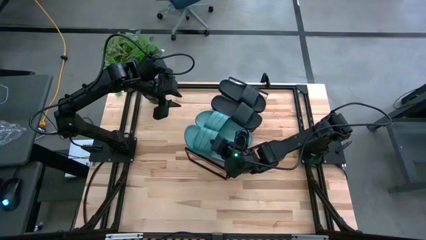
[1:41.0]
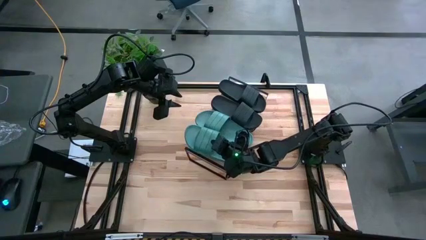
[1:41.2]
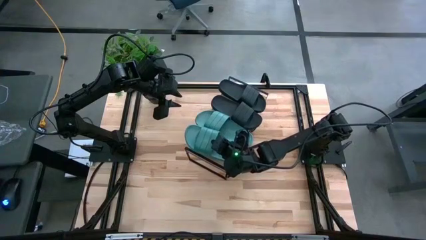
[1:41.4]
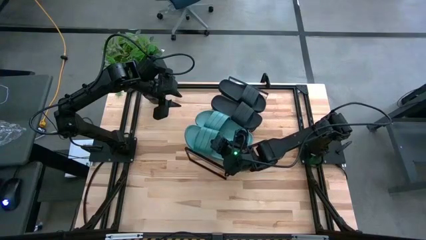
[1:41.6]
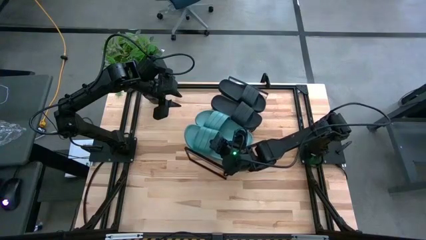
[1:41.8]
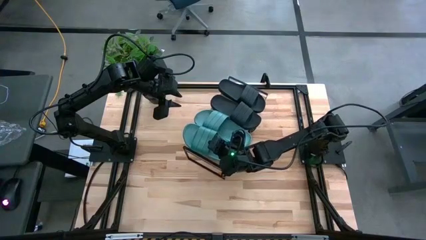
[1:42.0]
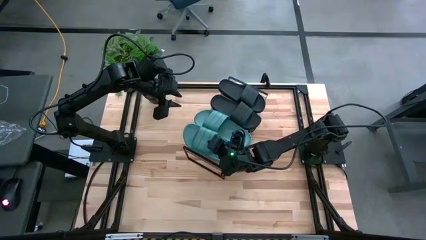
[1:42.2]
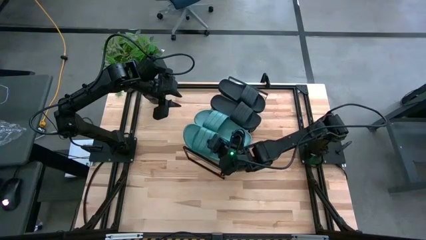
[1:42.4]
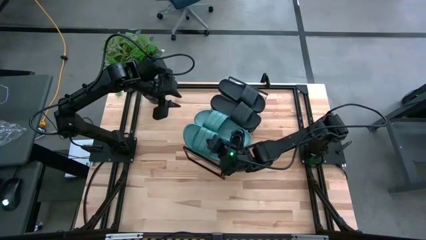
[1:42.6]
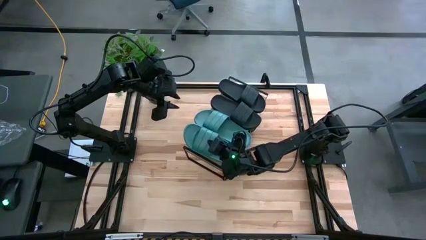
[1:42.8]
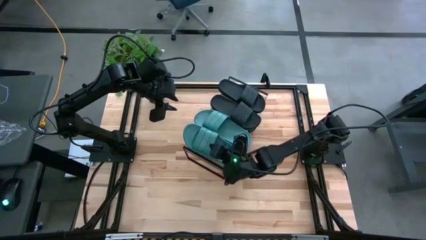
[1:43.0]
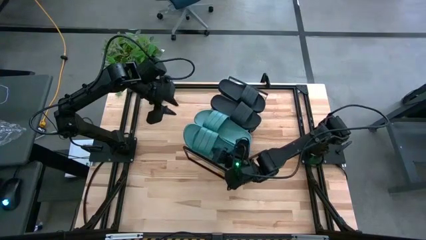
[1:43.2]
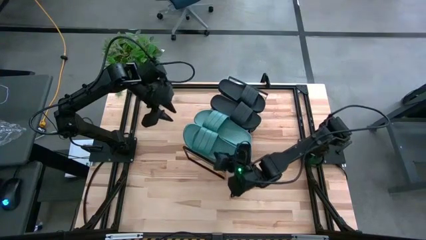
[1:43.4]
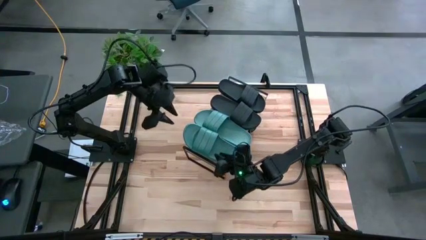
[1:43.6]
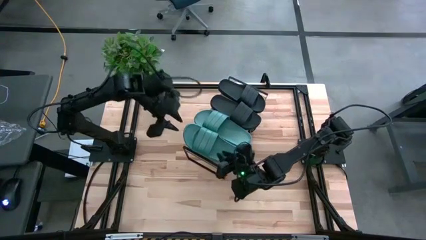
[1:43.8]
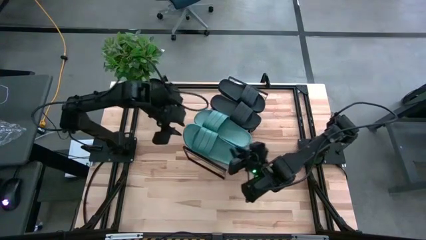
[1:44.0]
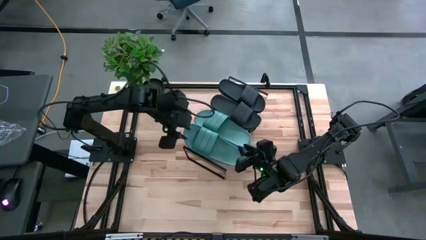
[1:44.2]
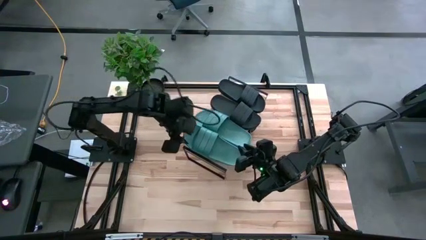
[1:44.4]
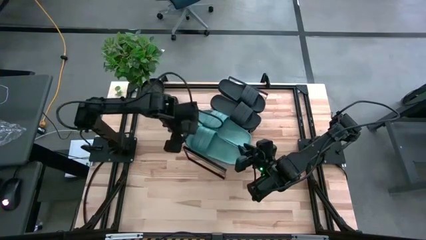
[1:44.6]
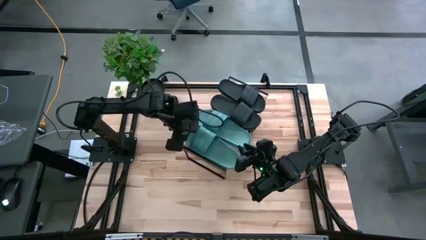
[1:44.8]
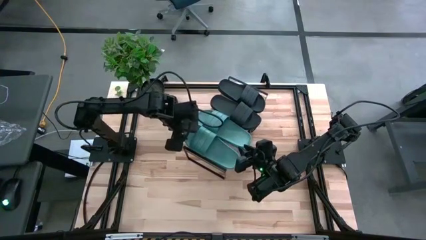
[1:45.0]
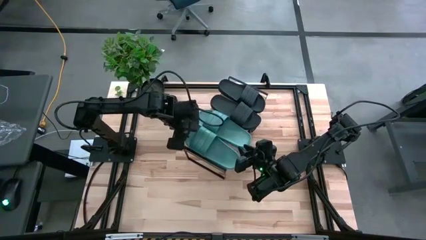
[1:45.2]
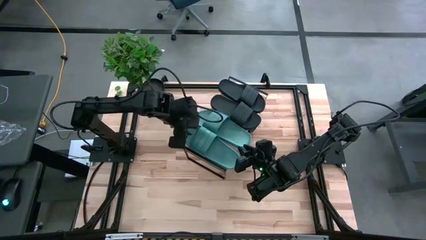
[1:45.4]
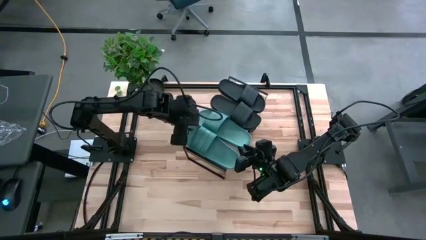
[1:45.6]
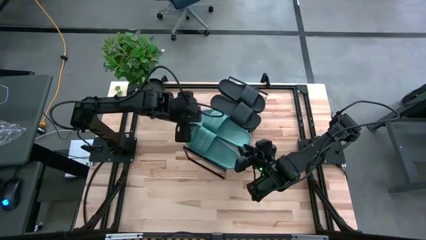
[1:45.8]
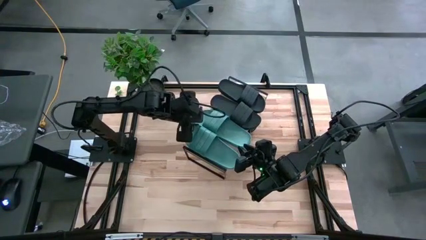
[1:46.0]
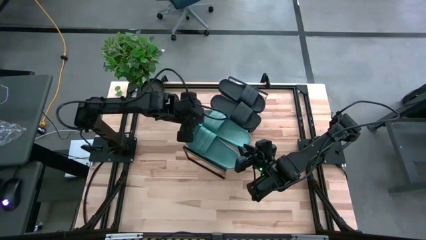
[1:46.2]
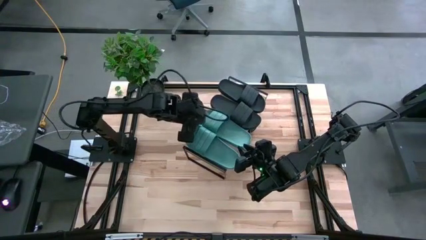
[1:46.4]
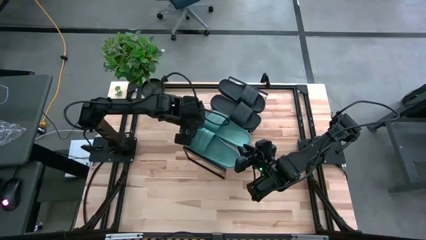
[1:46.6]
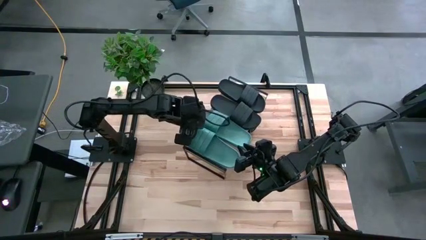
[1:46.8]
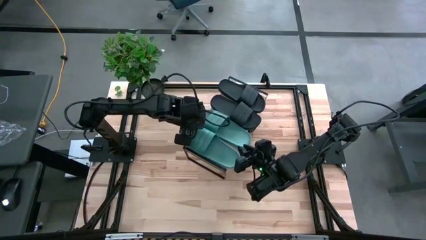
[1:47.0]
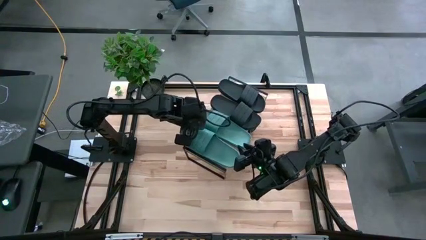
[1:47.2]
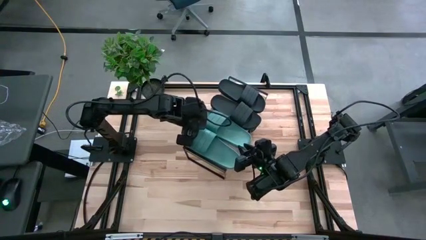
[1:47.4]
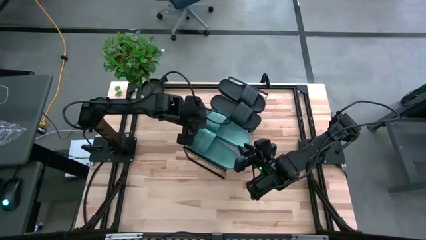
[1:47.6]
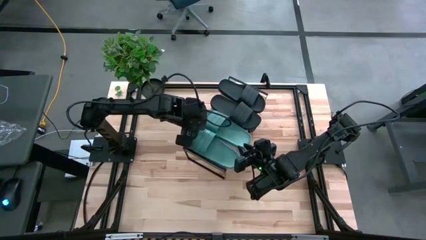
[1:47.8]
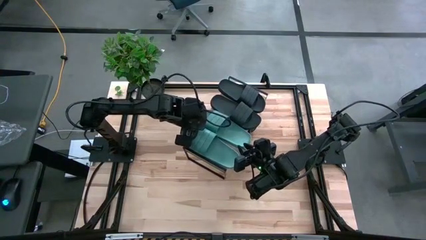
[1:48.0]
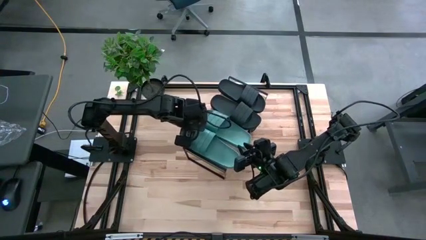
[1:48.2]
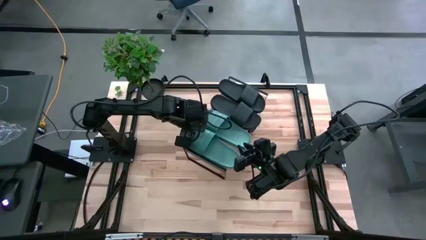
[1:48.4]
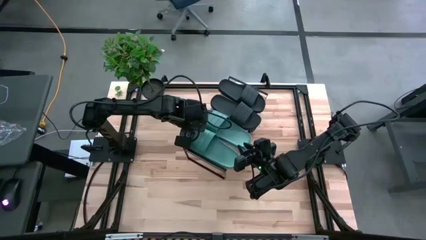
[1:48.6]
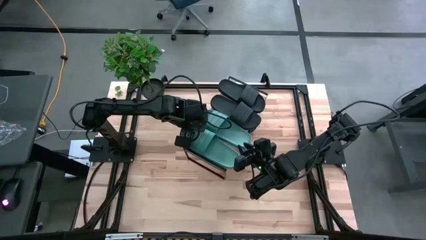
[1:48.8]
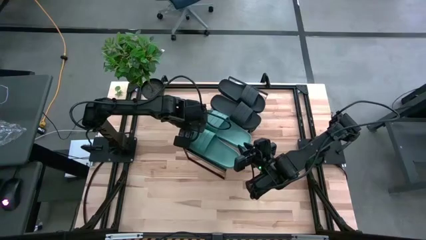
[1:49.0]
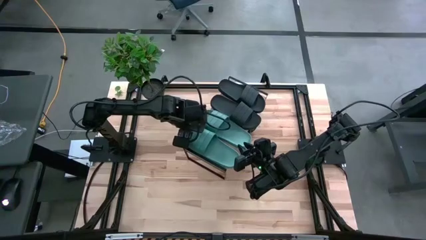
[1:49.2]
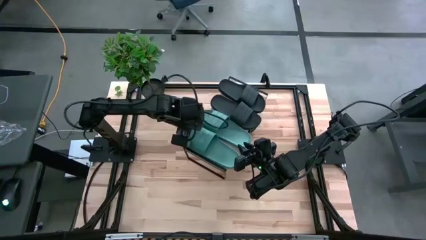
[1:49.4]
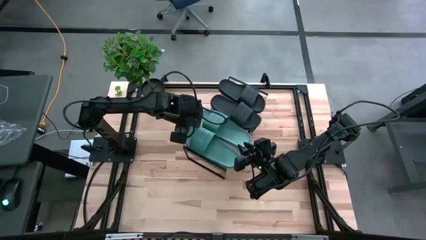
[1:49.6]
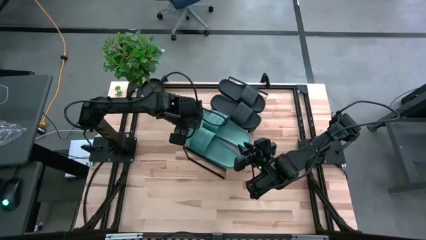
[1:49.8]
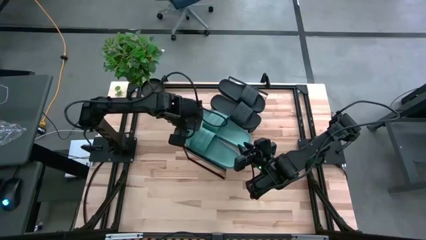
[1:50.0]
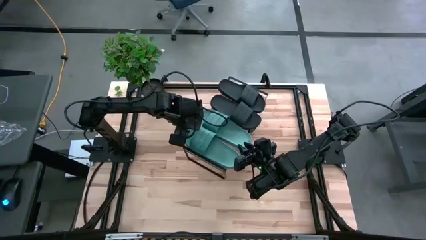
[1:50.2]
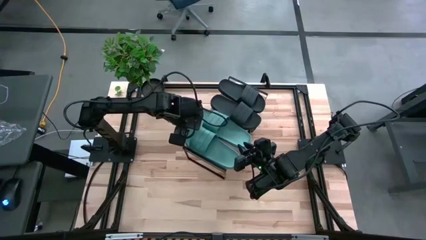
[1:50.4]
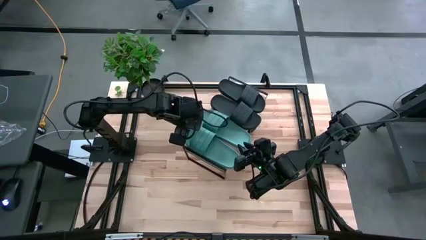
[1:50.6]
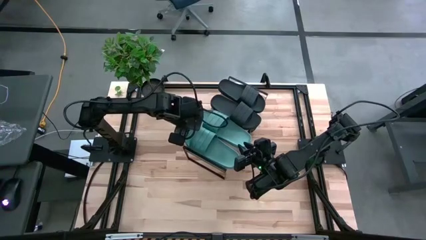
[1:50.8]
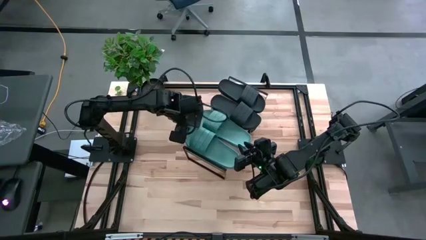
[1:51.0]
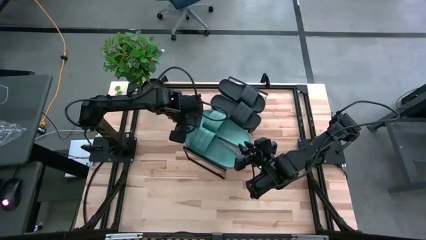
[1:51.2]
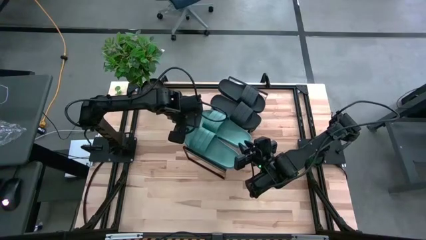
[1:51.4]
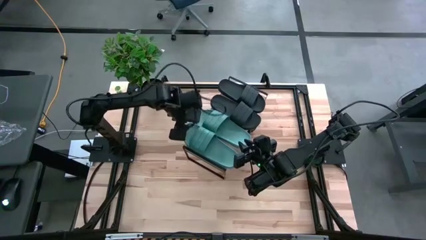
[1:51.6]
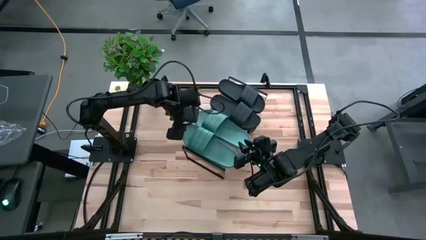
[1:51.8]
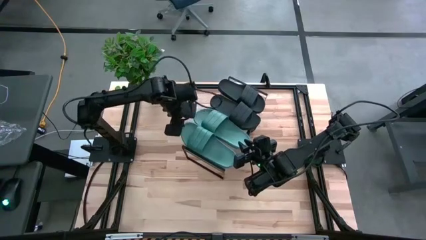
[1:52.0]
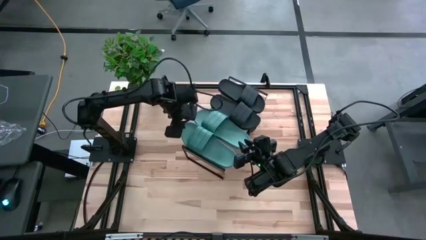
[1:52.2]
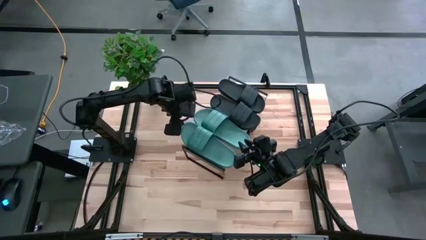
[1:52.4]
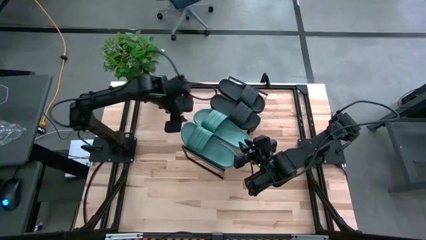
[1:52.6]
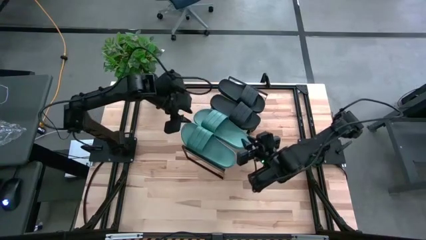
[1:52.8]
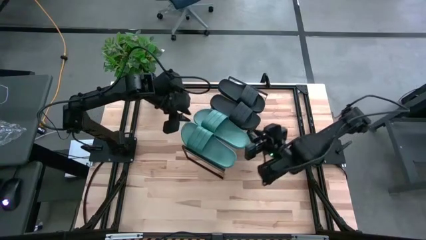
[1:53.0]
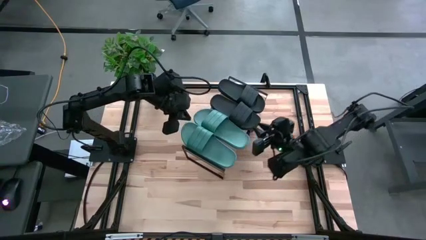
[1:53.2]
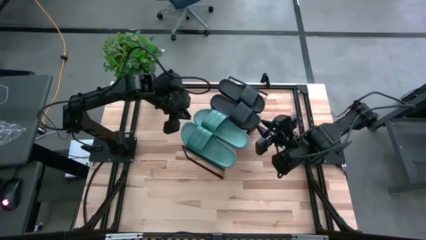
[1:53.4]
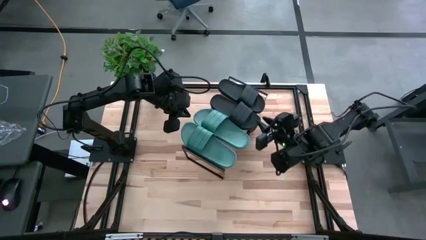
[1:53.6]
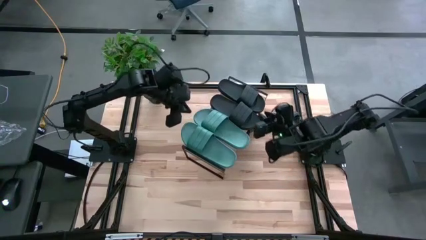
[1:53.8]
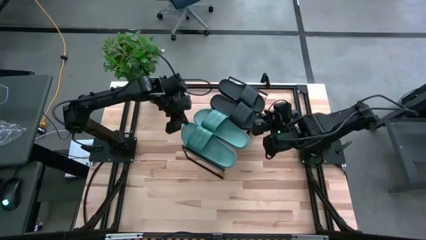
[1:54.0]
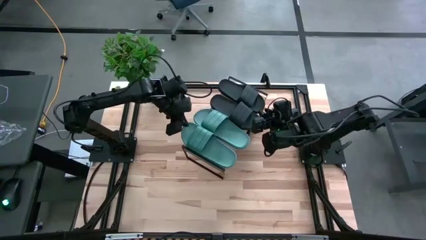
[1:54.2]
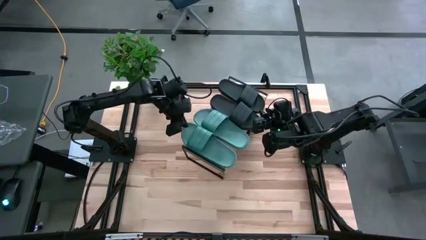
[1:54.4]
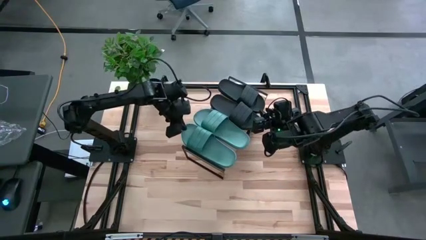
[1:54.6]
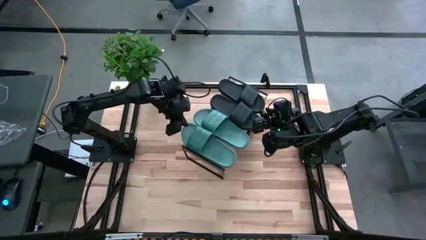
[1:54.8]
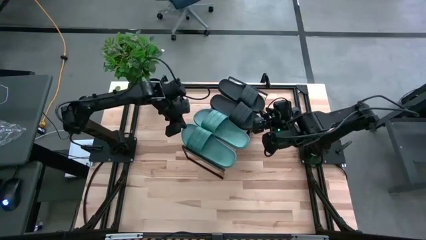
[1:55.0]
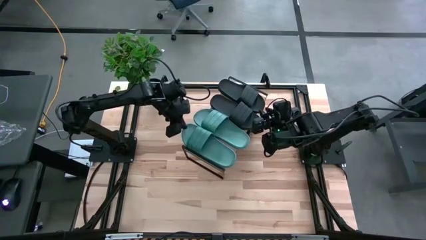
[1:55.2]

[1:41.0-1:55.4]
Task: Pick and place slides into the shelf
Put the green slipper on the shelf

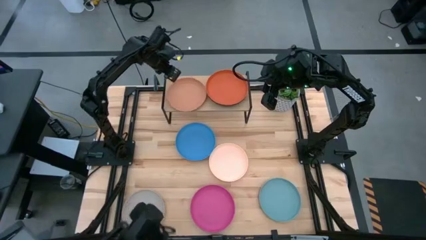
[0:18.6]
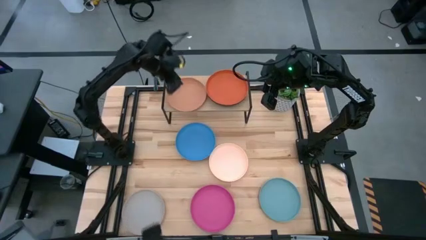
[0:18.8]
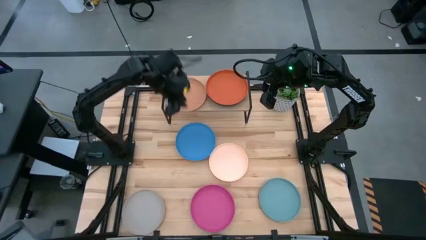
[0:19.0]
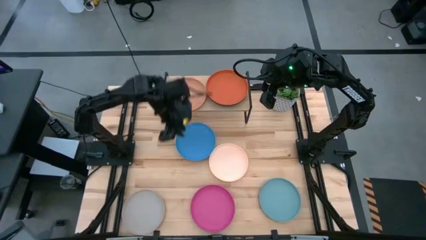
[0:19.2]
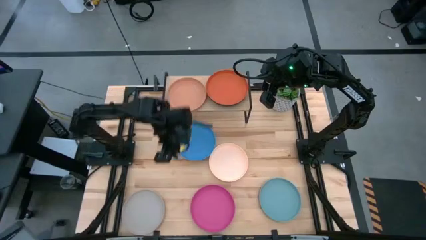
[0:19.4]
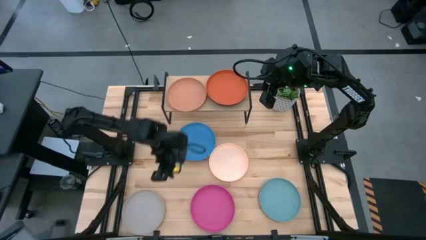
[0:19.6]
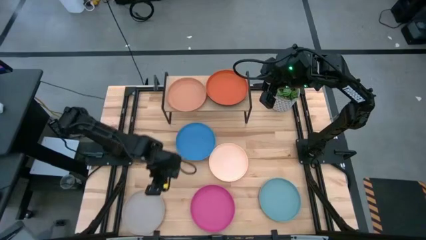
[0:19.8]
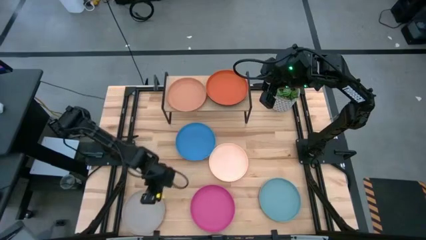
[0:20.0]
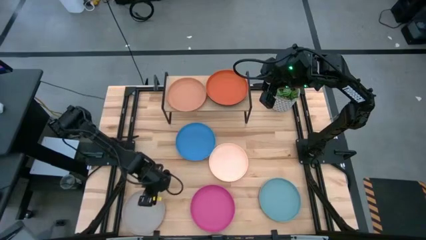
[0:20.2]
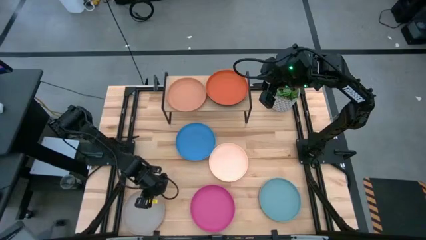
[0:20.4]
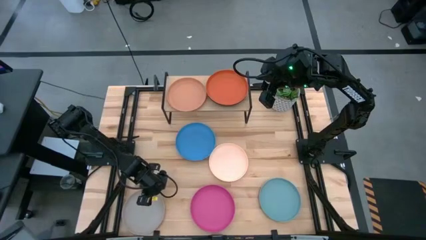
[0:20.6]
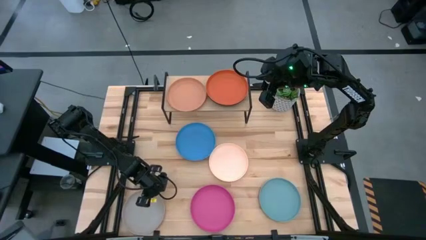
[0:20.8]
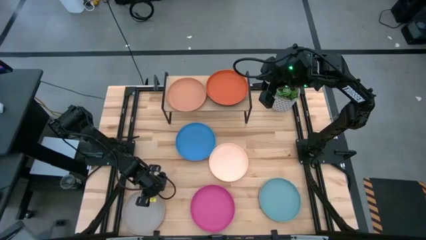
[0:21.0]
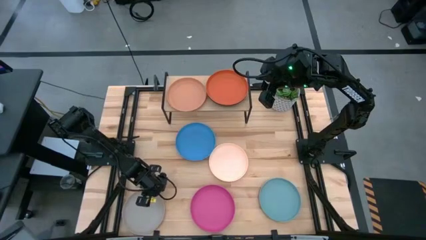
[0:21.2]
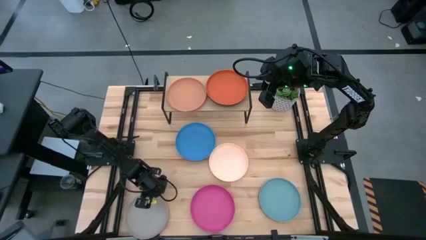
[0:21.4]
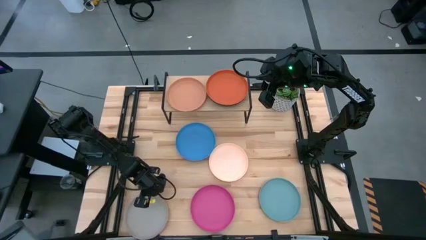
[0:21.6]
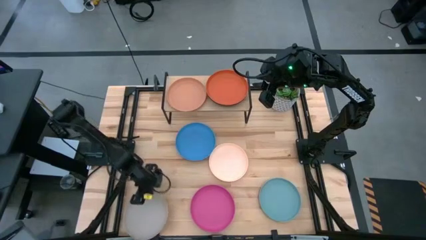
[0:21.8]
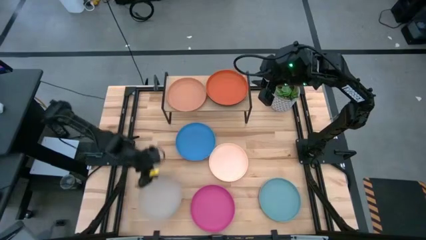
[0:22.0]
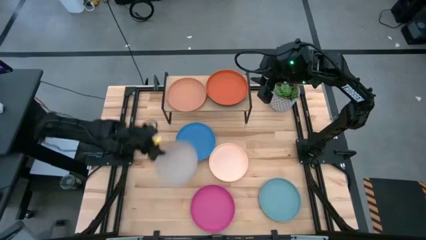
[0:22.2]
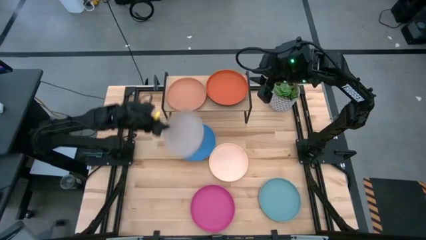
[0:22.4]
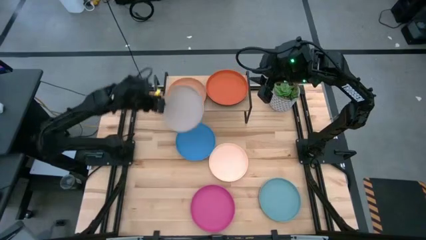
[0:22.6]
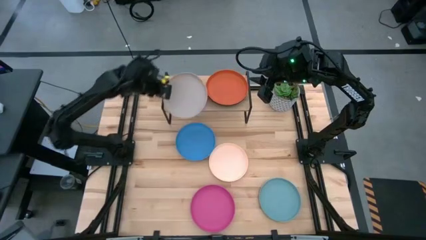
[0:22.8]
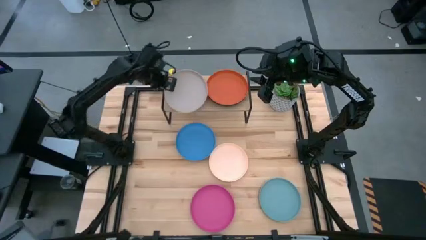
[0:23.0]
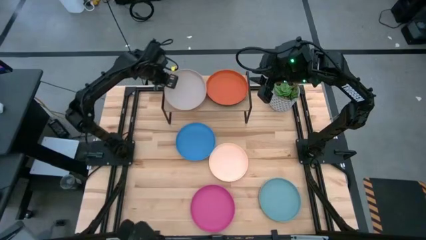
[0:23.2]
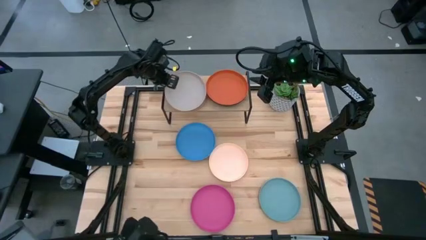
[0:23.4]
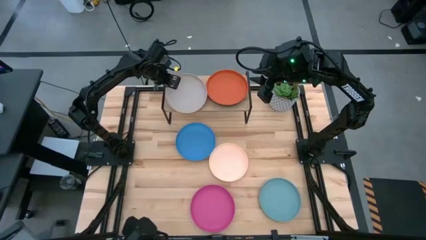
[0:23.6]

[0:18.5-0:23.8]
Task: Place and stack plates onto a shelf
Stack the gray plate on top of the brown plate on the shelf
